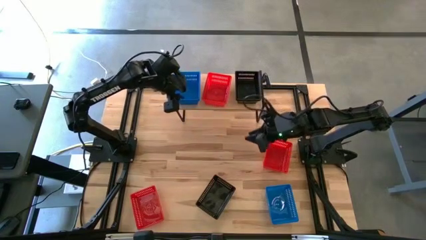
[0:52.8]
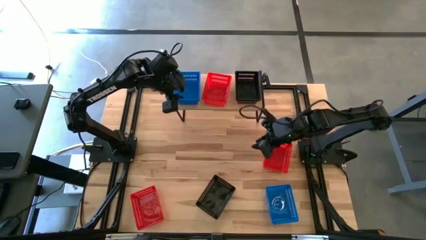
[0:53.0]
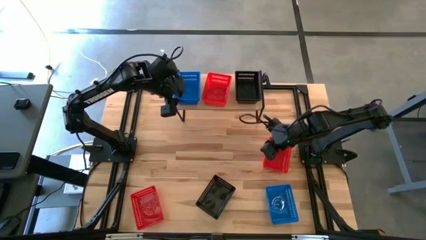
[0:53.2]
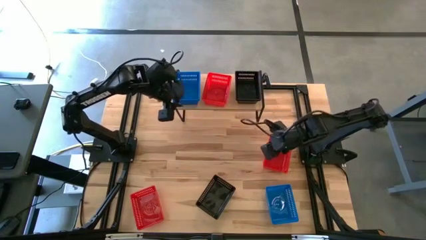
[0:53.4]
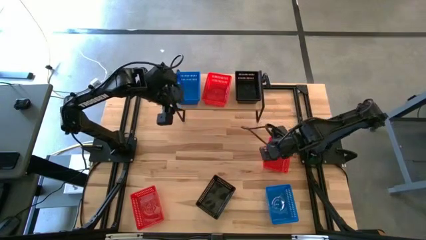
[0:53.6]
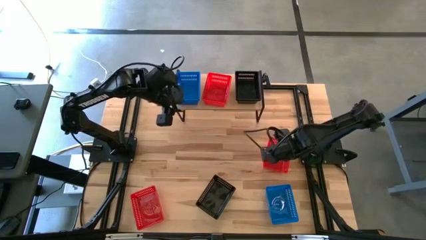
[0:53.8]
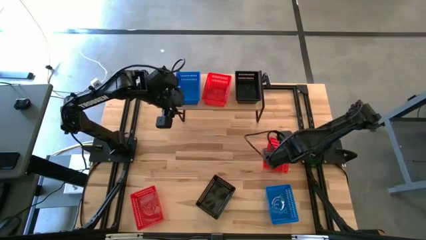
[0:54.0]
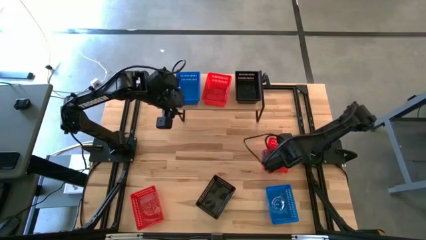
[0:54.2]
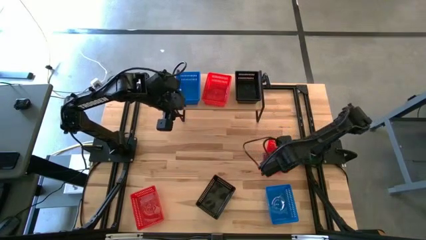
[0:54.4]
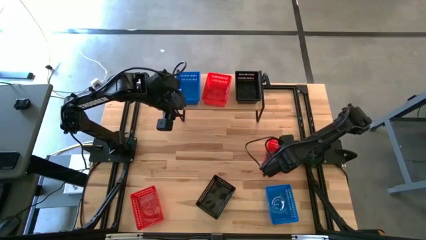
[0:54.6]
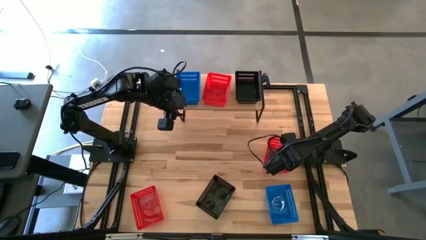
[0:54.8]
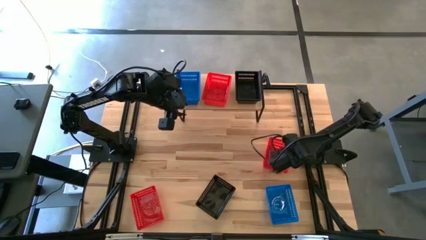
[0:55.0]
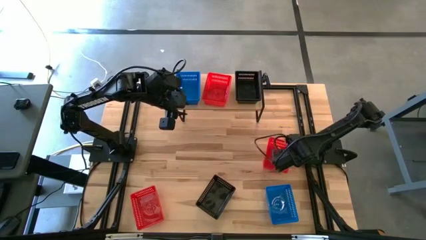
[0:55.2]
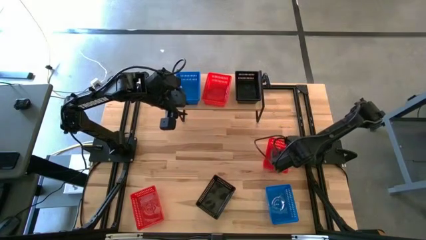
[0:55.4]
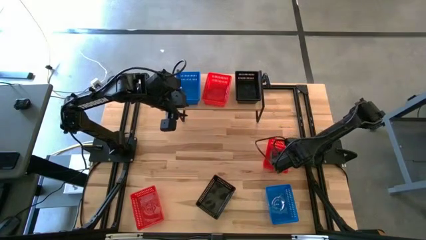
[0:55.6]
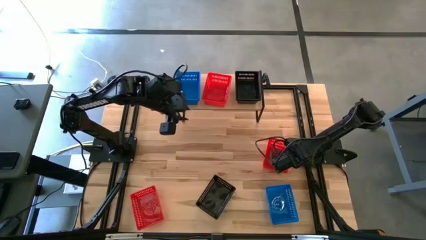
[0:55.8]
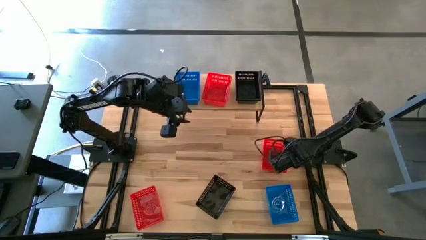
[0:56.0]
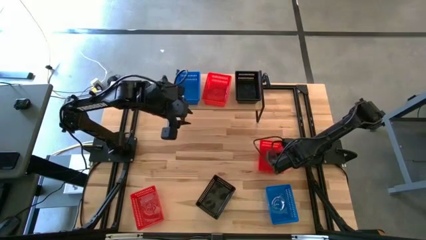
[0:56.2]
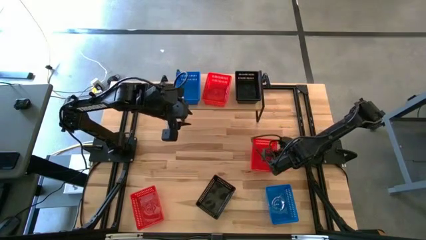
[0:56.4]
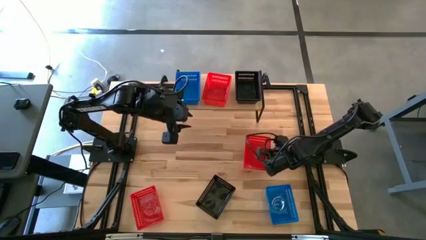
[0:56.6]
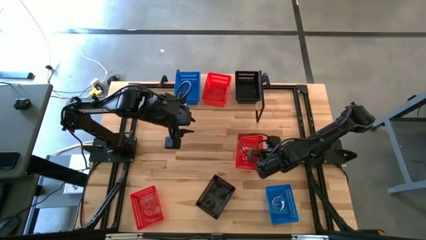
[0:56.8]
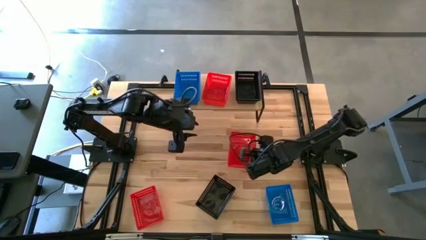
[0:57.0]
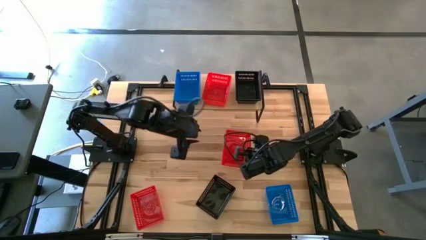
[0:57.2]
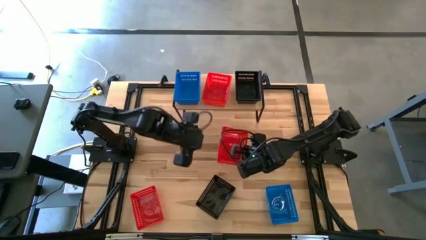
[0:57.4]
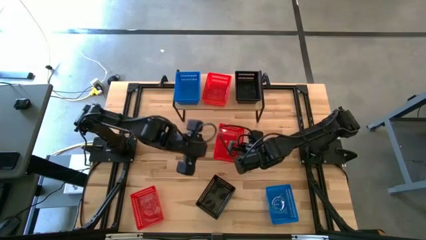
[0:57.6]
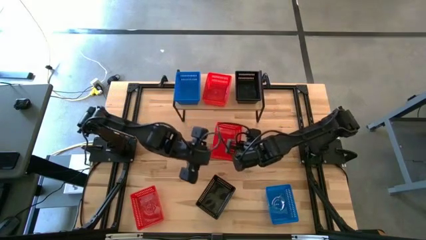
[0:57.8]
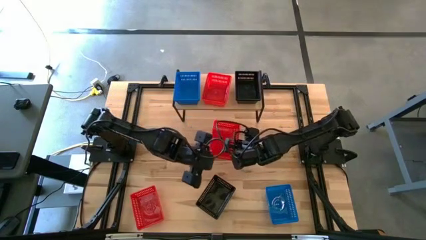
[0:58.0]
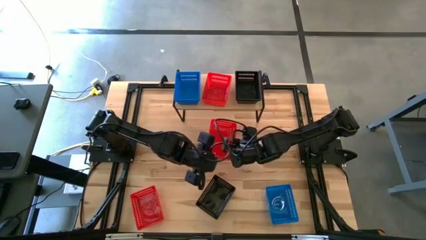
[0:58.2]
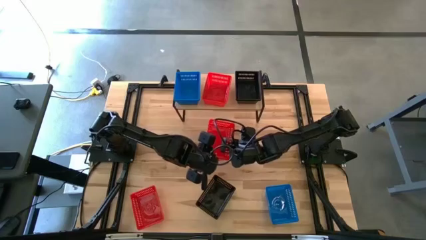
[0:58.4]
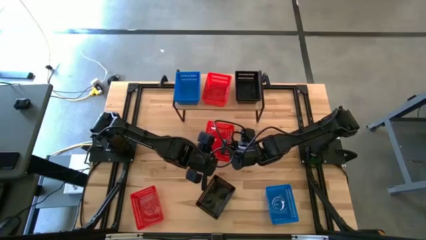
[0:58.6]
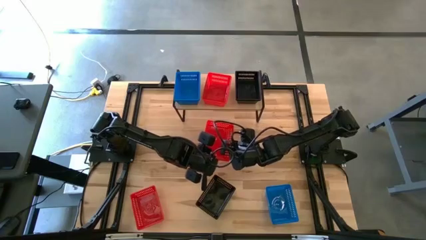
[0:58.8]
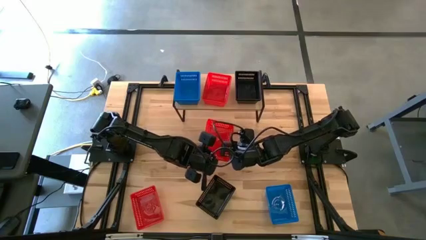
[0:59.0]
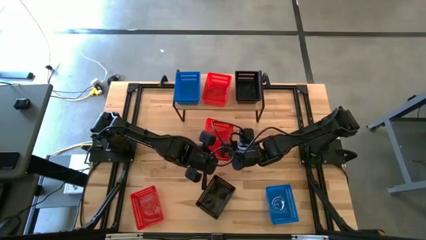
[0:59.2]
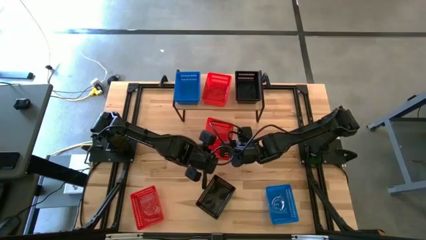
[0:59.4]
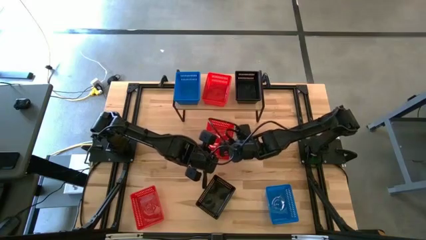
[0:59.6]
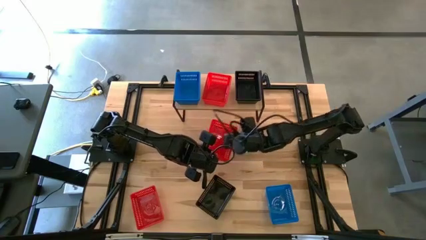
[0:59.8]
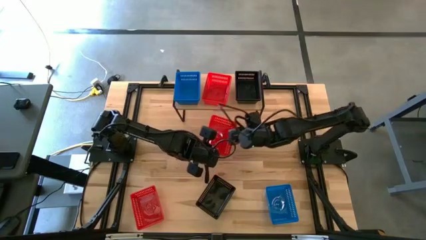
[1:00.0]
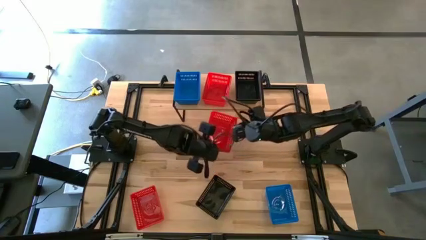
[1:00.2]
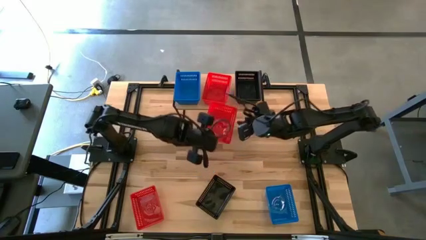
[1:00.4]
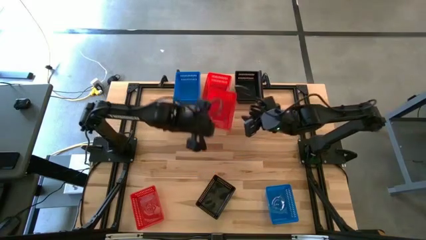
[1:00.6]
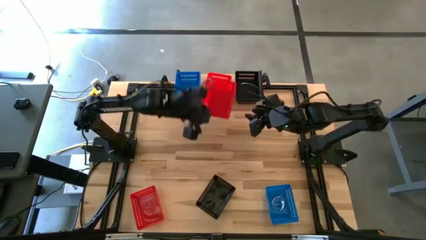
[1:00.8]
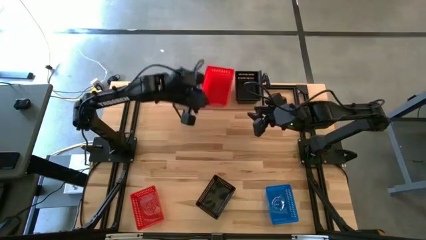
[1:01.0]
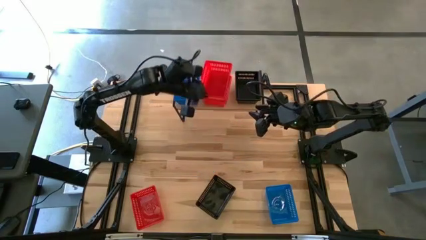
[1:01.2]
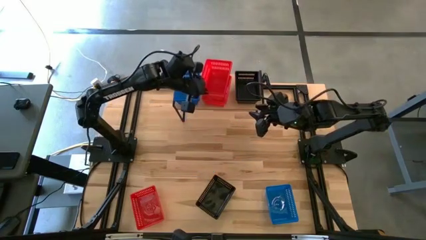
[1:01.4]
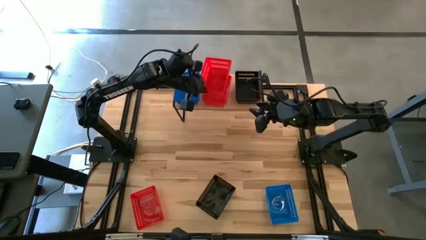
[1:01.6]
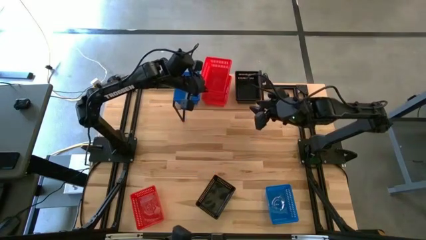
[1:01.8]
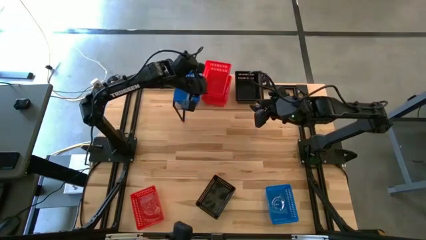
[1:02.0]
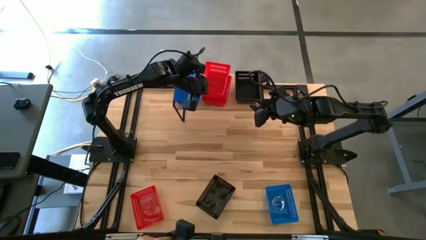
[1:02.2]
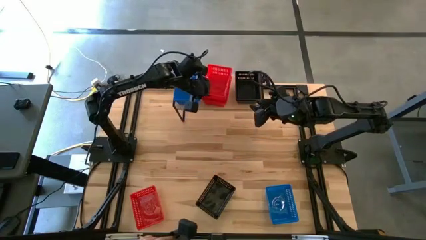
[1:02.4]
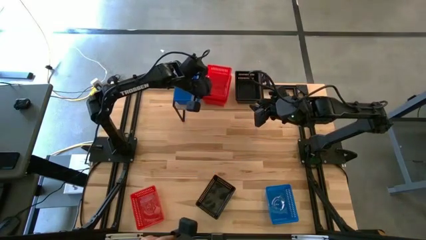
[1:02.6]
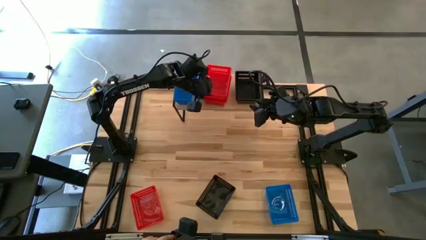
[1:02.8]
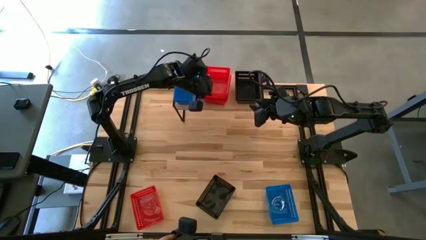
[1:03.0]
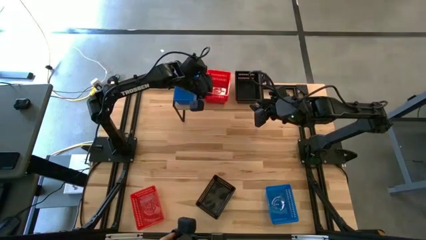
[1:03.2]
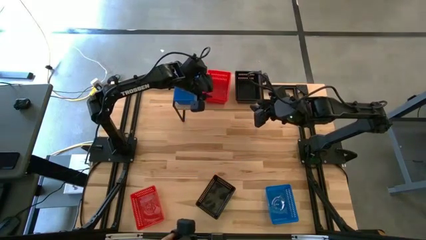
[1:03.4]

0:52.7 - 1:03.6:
Task: Stack baskets on shelf by color
Stack the right red bin on top of the other red bin on the shelf

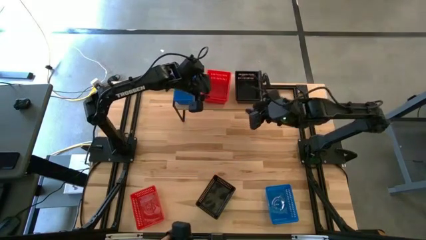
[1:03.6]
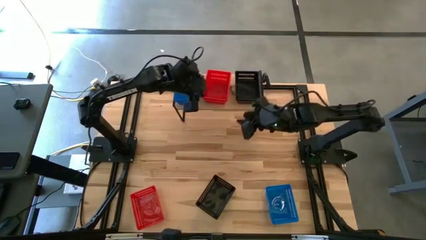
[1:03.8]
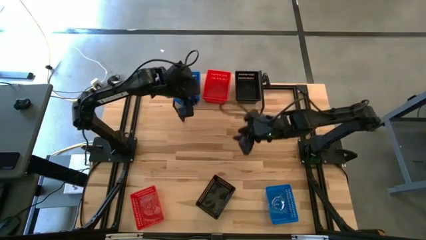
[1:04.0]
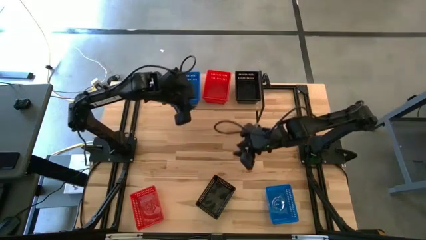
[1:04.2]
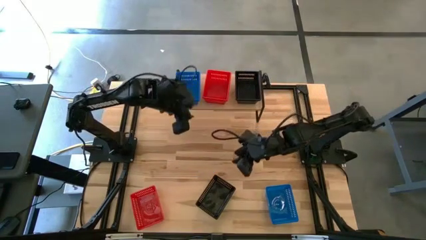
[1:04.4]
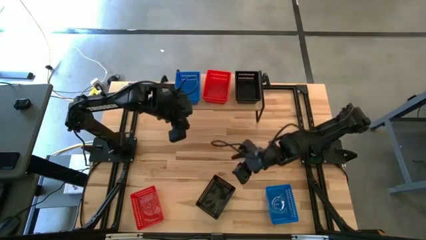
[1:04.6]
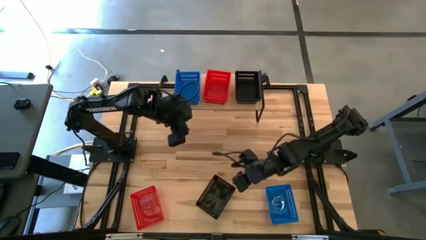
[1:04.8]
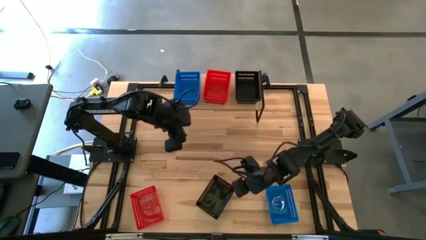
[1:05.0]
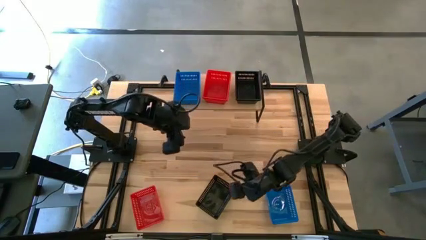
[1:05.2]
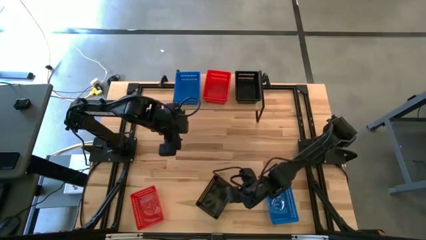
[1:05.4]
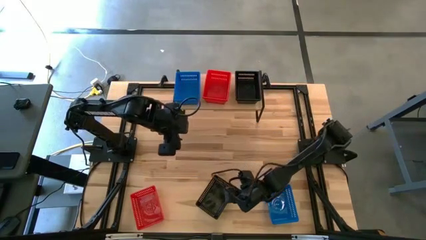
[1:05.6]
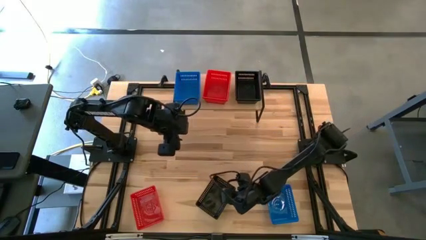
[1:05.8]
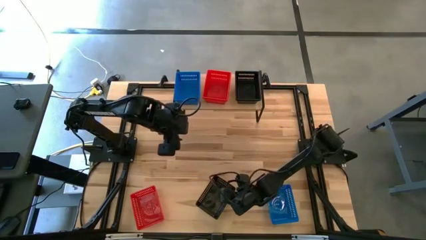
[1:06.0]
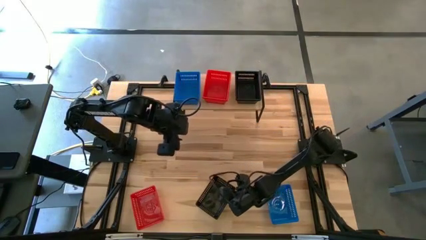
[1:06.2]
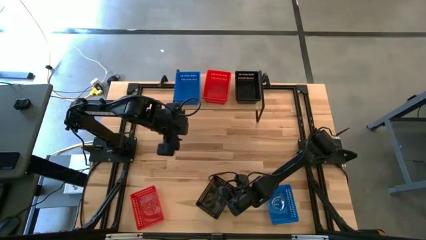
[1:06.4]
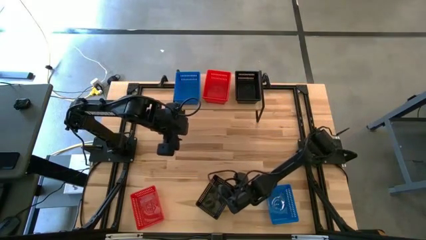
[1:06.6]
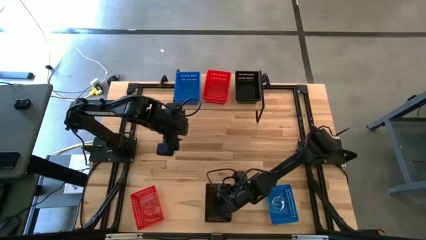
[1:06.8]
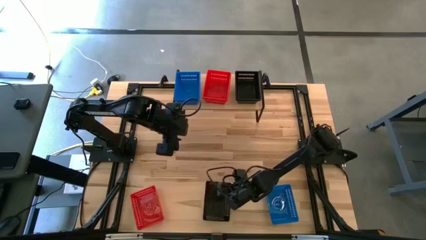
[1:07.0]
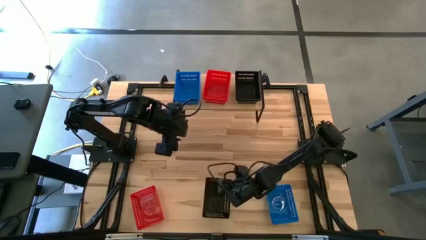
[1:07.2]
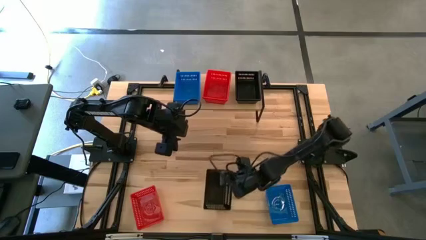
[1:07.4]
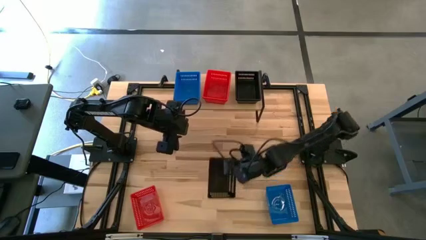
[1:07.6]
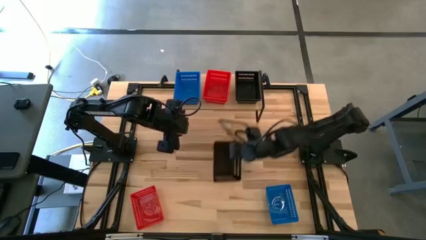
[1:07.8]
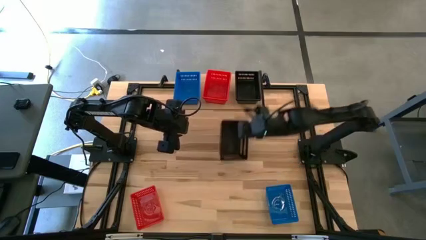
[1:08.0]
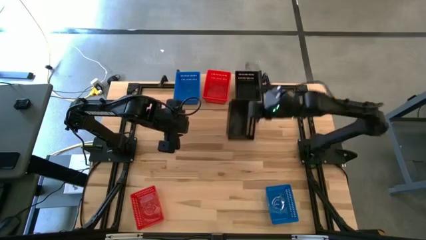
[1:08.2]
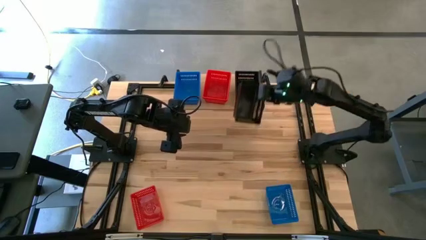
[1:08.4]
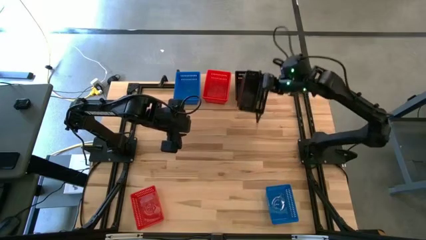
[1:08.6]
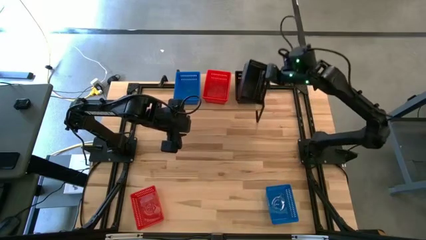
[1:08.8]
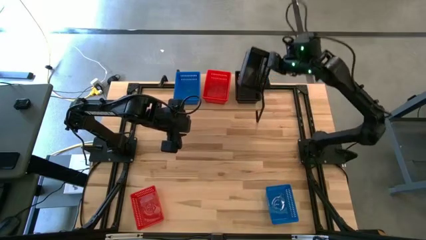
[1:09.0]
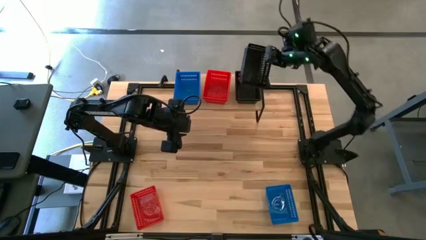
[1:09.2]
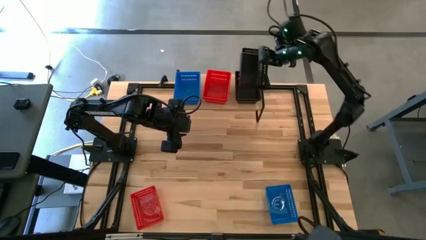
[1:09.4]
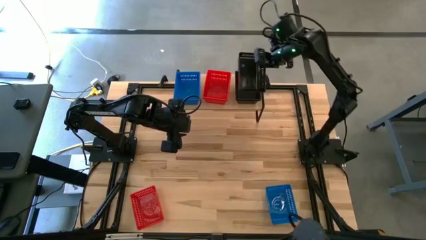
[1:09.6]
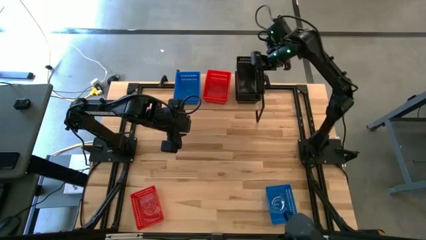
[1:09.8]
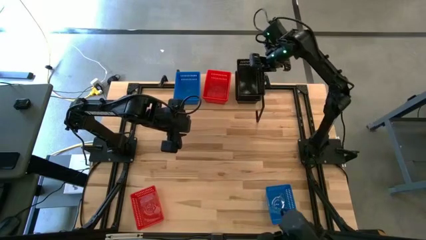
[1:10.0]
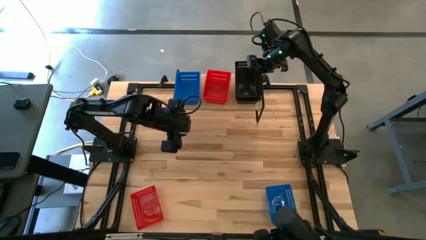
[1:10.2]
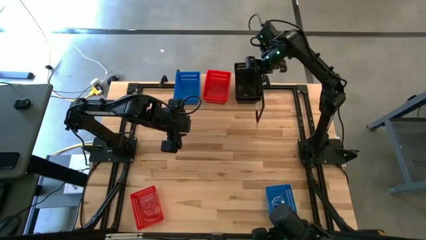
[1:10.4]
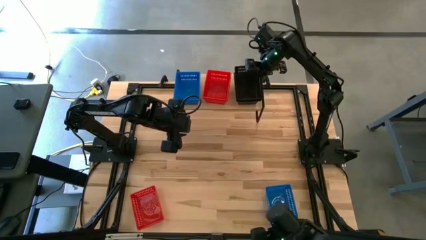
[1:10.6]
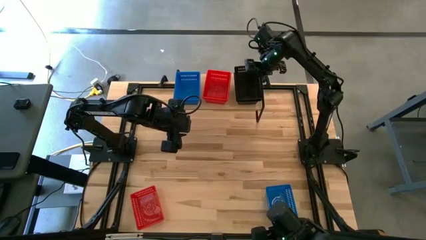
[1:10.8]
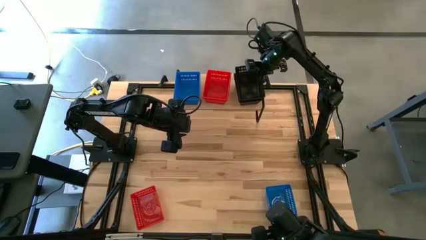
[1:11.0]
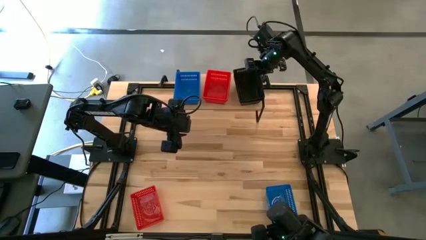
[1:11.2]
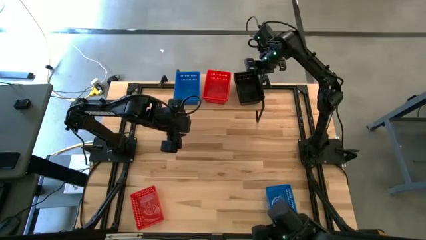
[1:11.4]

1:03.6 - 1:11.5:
Stack the black bin on top of the other black bins on the shelf
